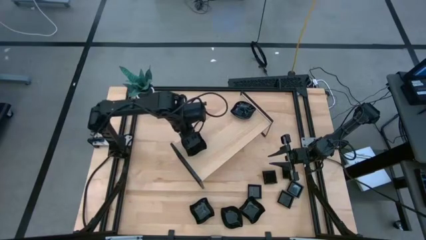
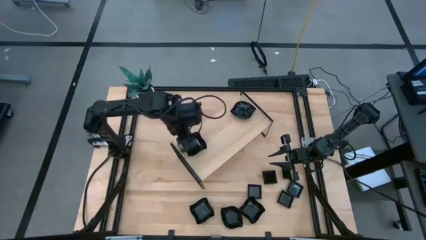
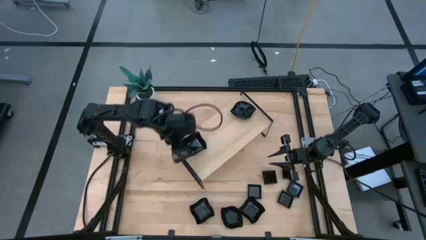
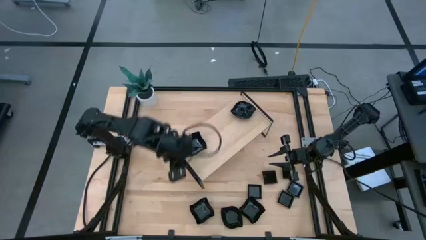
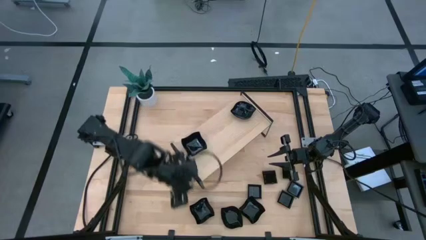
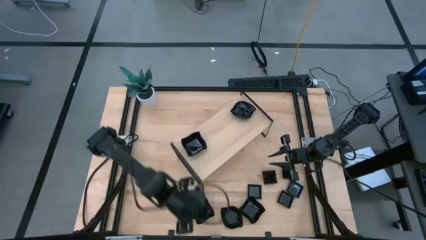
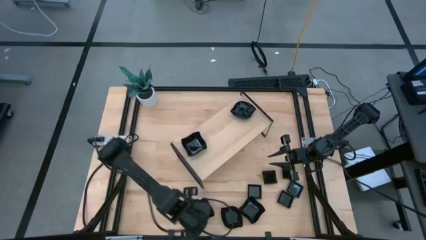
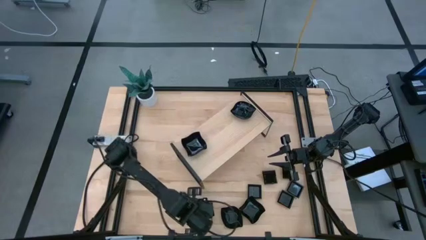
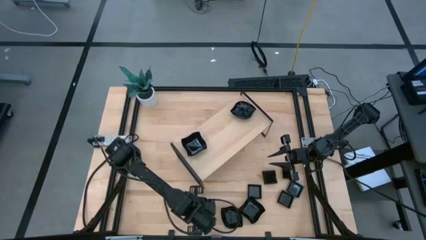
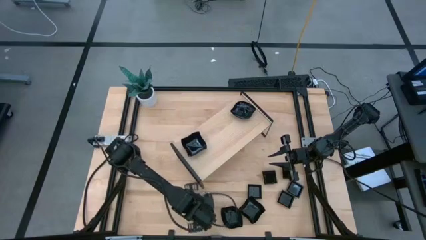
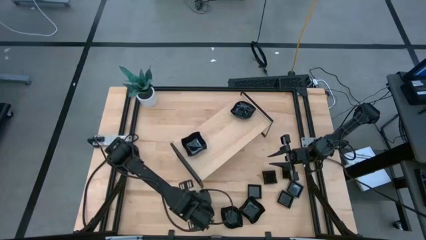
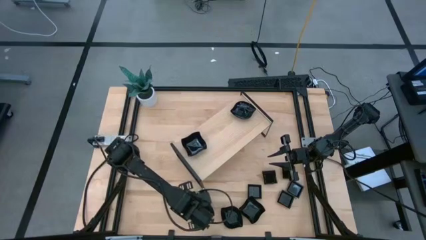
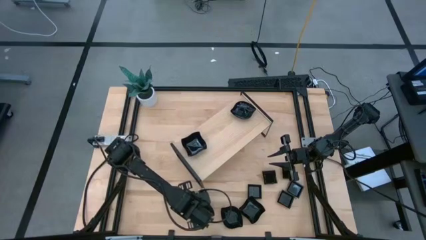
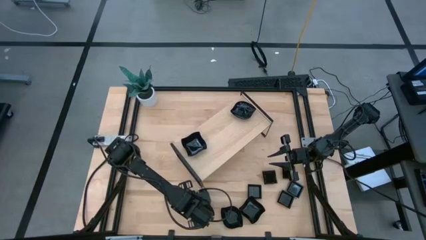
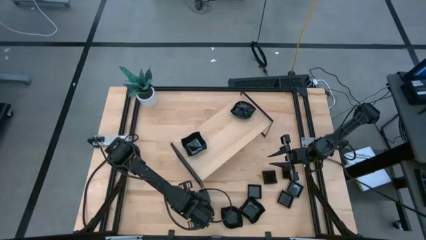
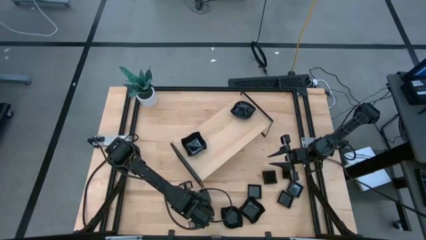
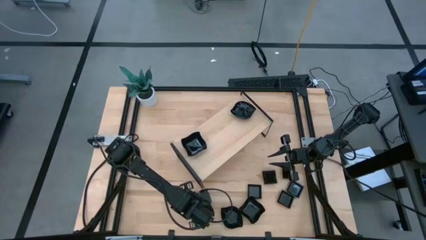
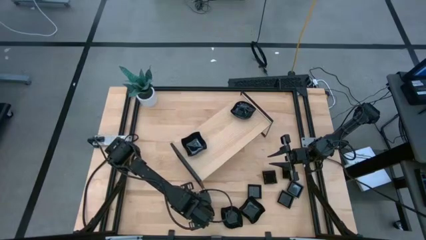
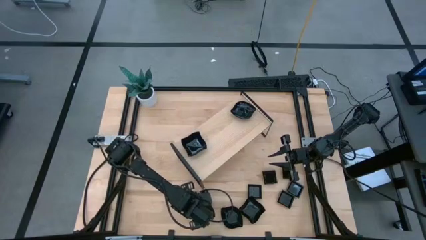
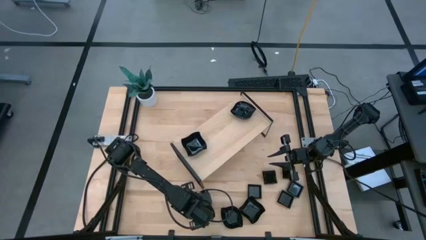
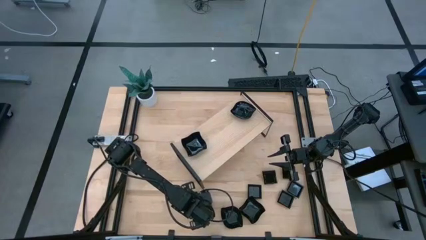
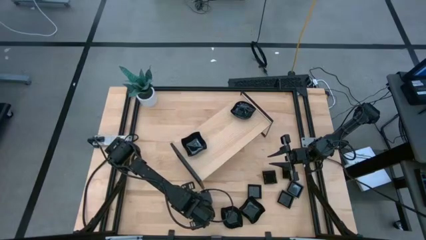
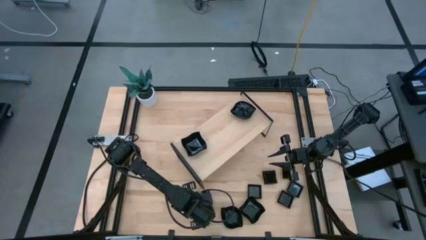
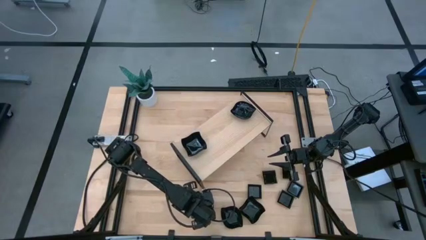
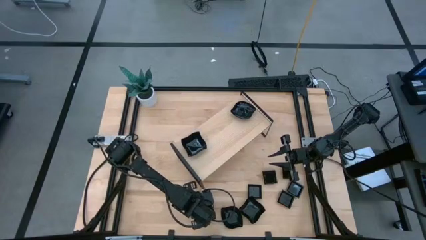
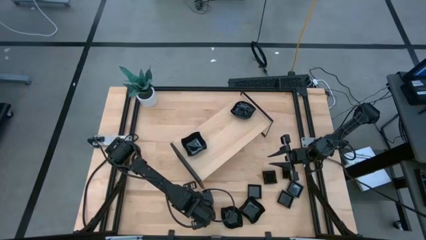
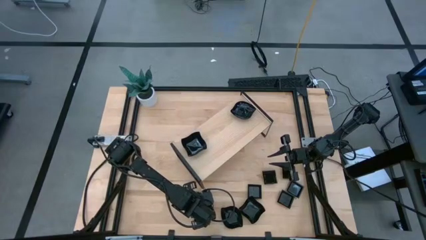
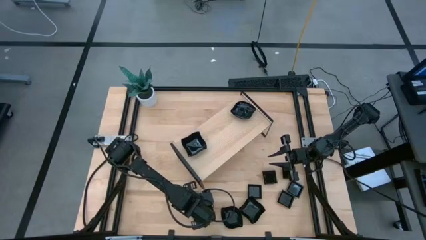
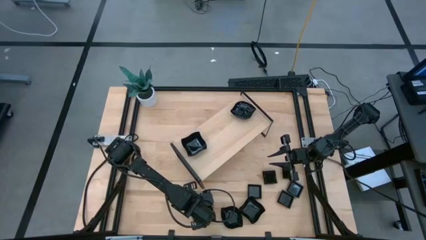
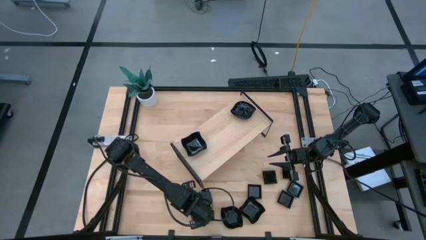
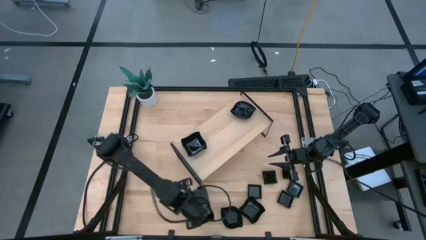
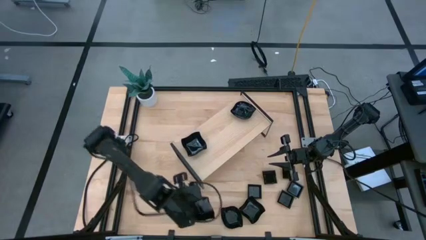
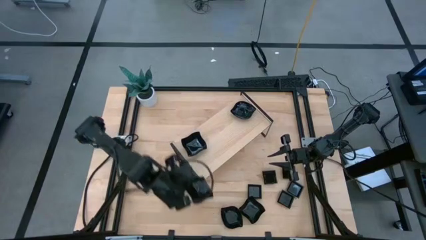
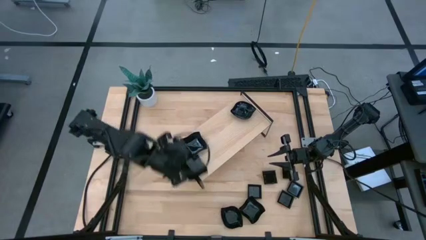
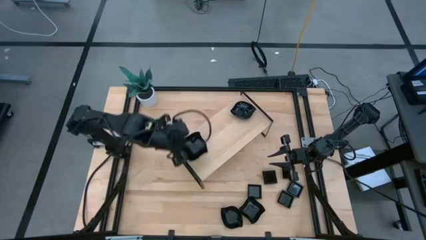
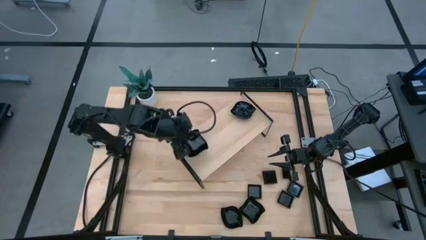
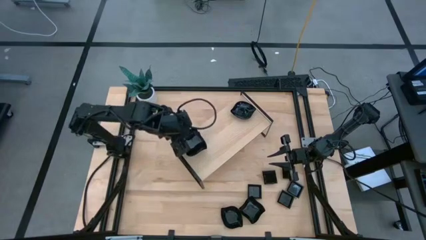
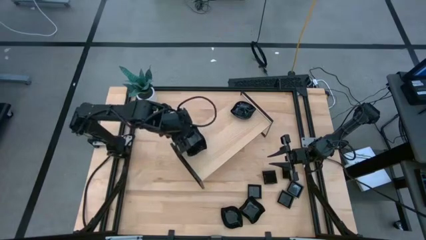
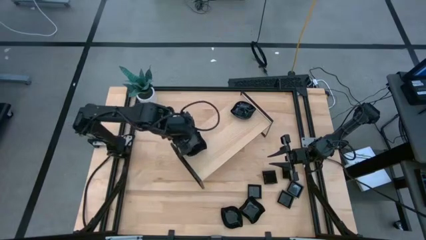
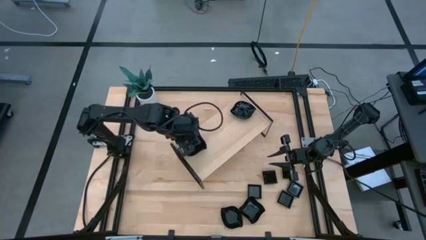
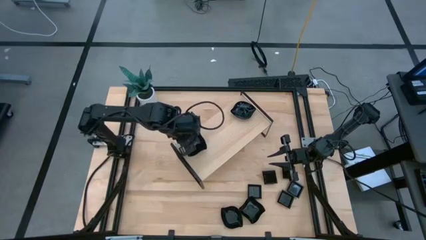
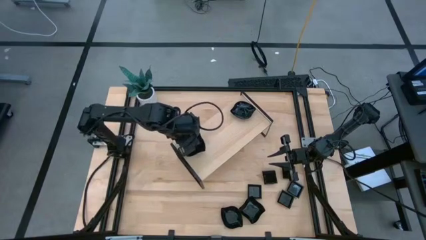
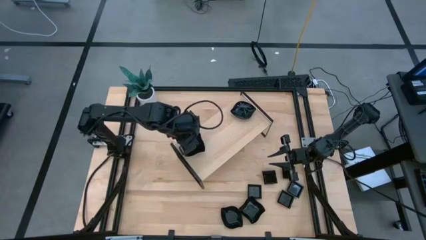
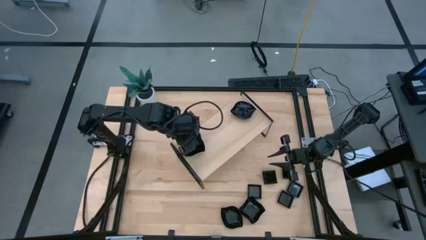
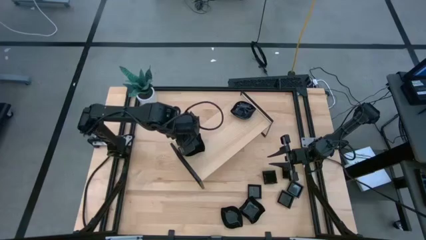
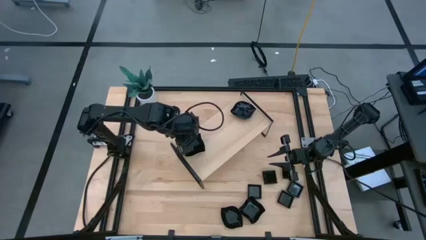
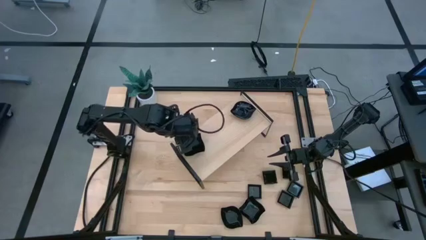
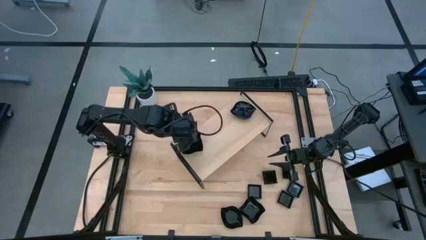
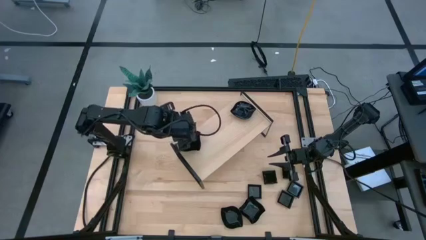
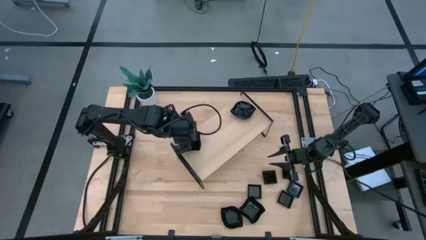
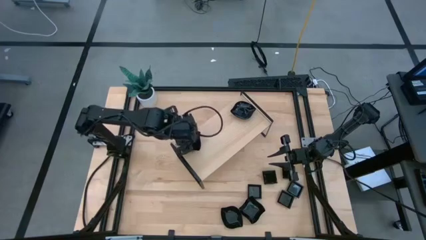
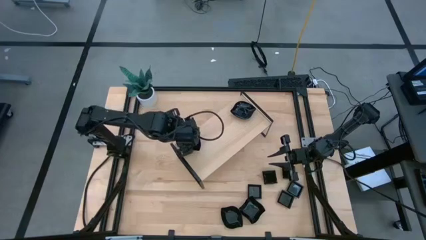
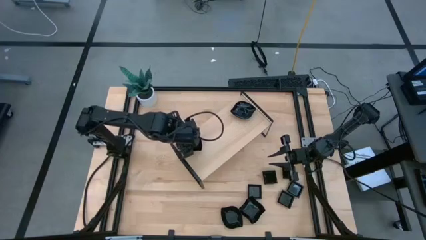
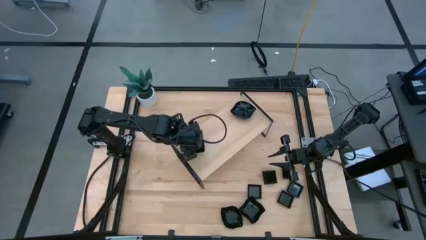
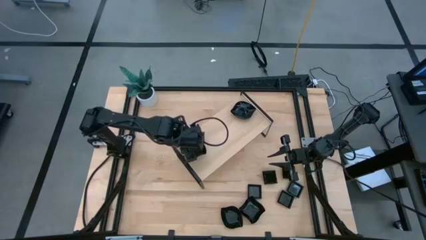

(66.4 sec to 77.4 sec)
Task: Pick & Place Mini shaped plates
Stack the distorted square plate on top of the other distorted square plates on the shelf

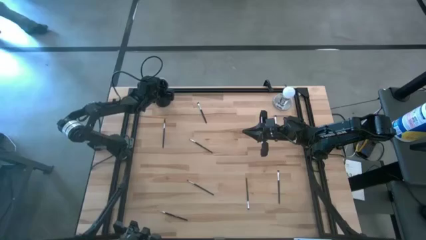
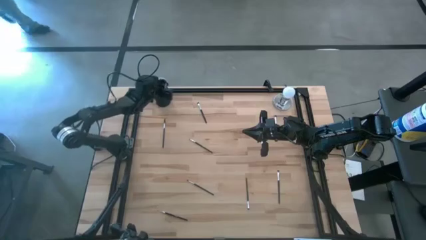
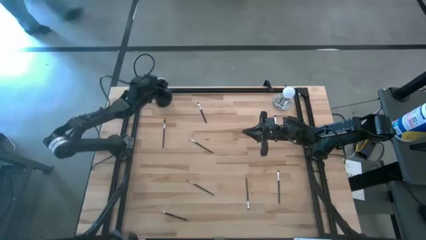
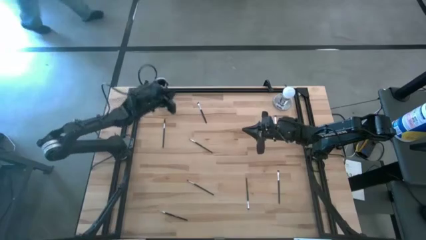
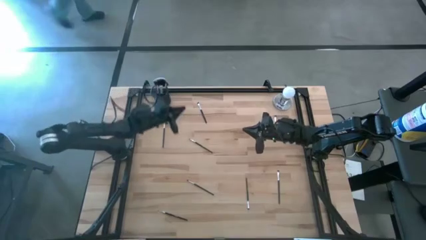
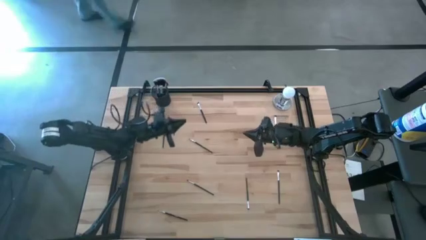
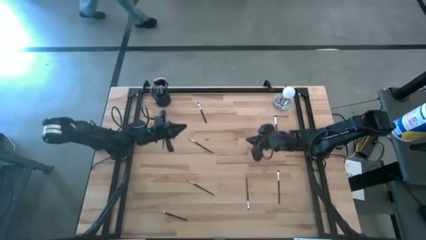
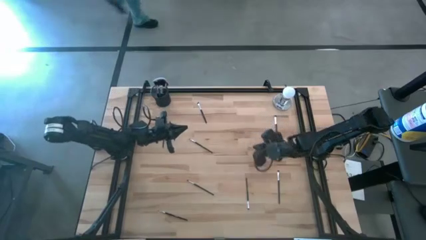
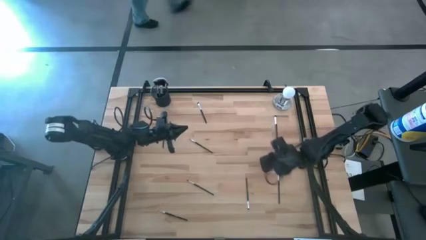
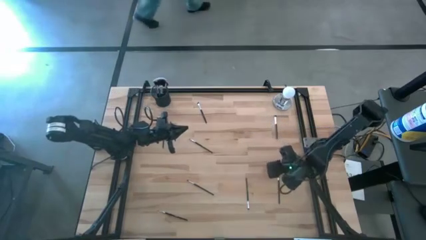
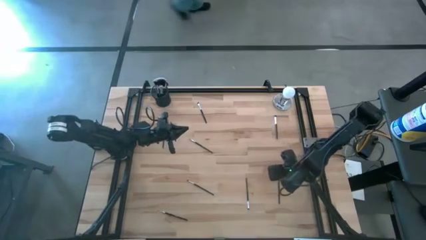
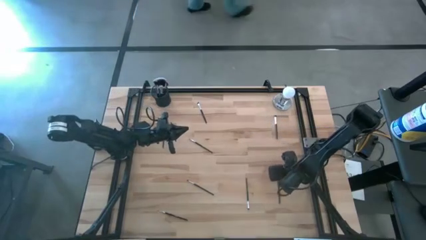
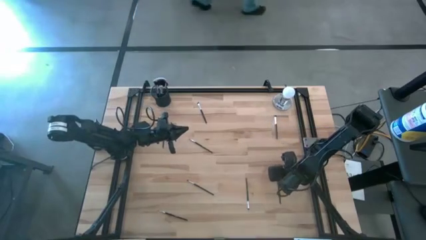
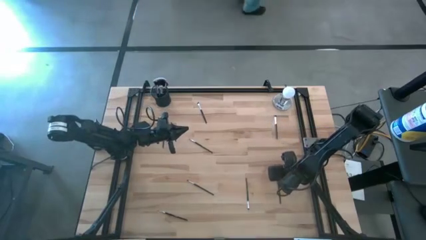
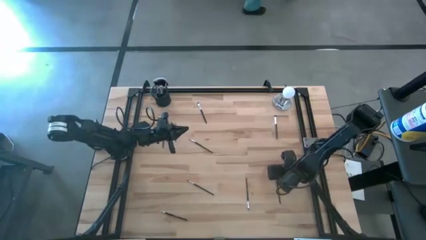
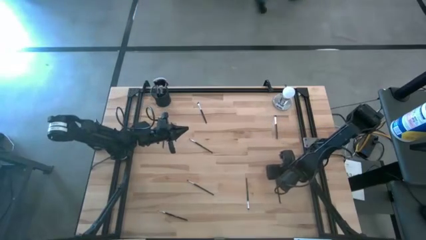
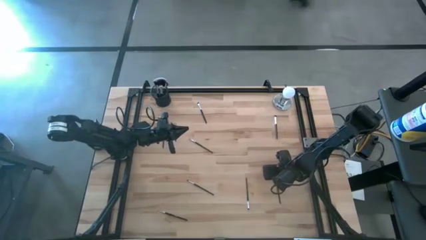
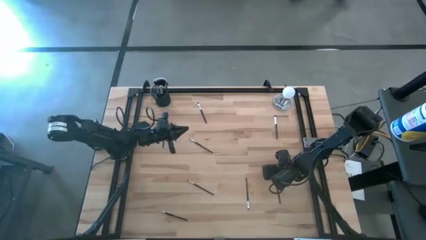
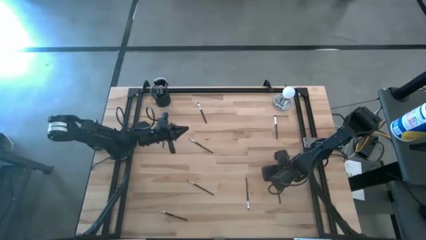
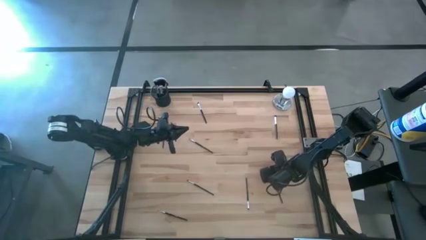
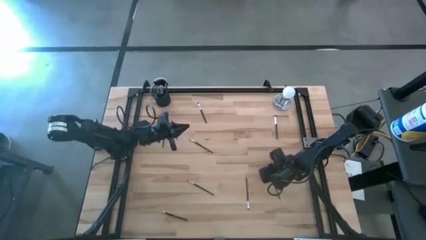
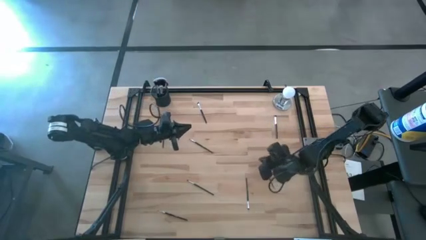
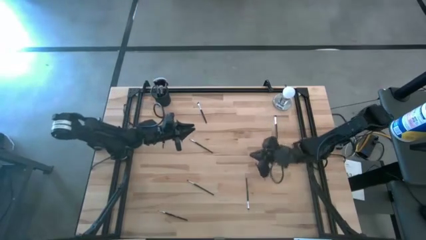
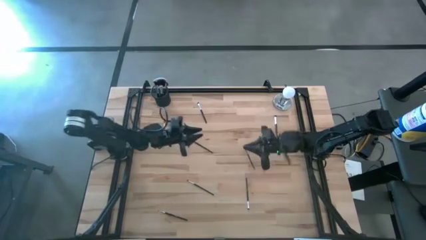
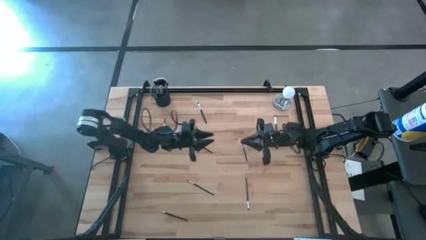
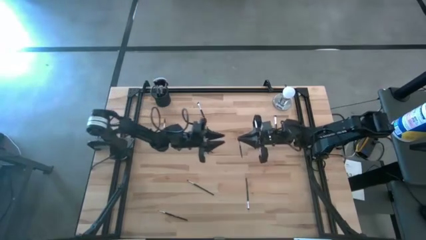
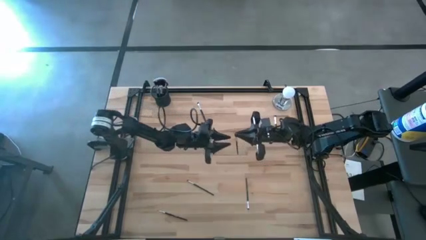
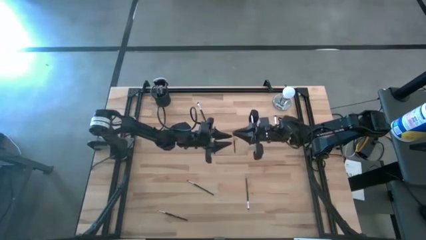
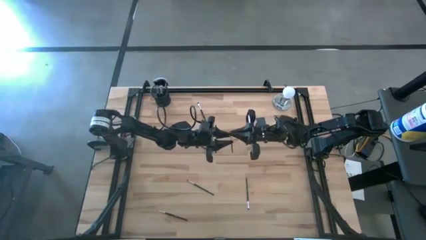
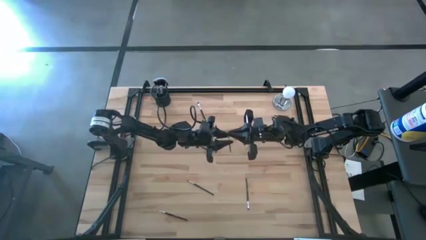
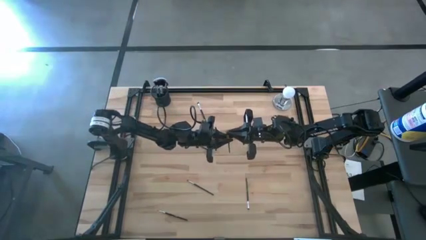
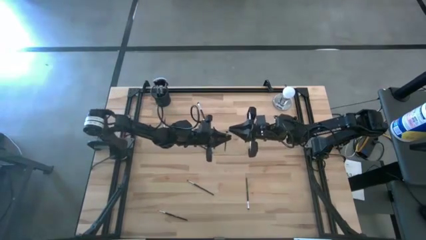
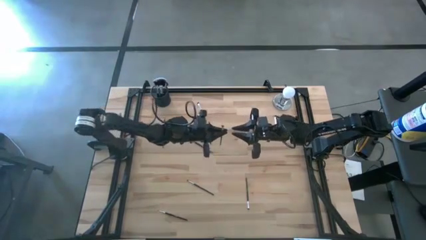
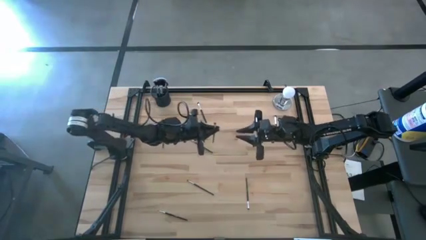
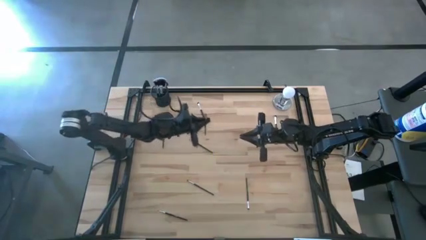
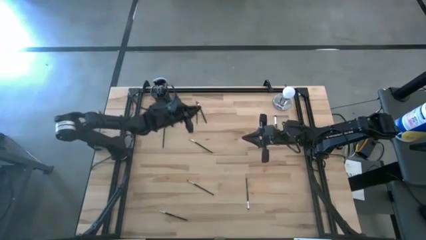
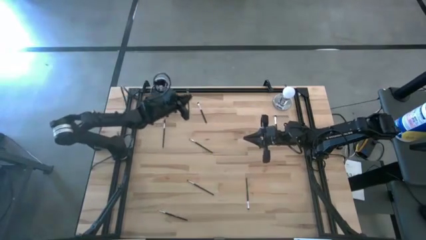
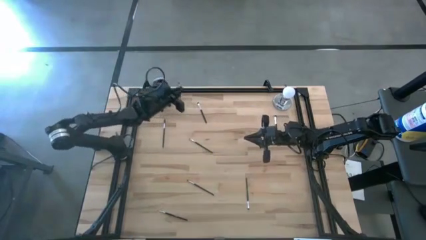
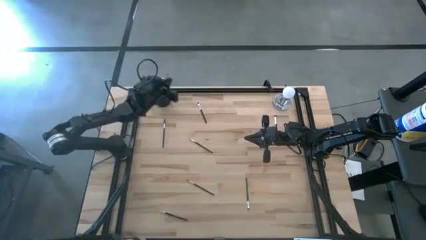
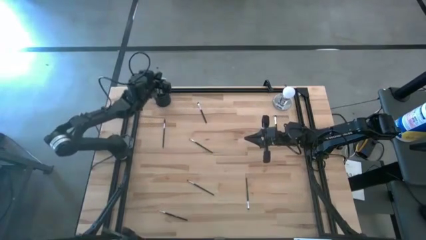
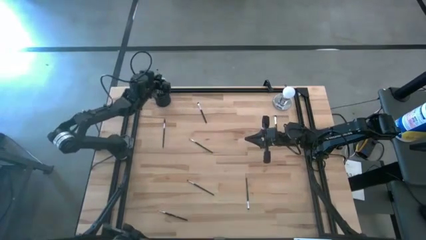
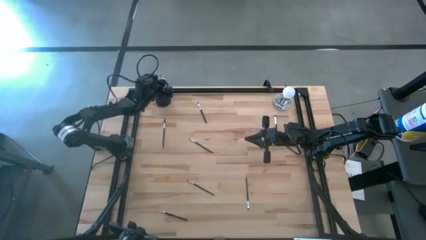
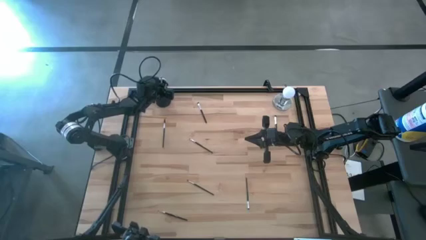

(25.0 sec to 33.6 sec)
Task: Put items in baskets/containers
Put the foundation brush into the pen holder
